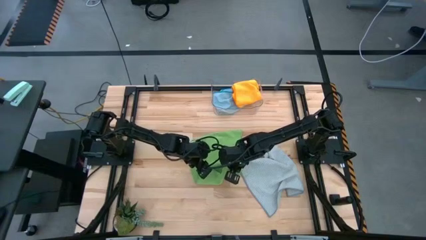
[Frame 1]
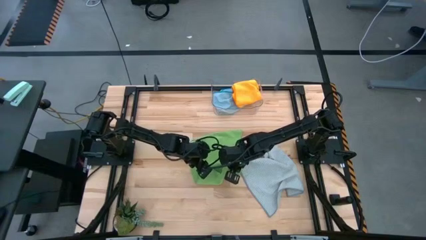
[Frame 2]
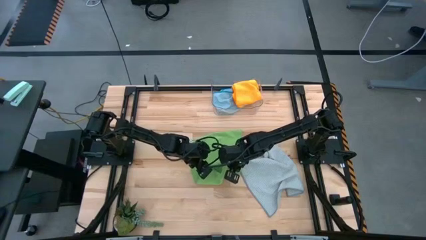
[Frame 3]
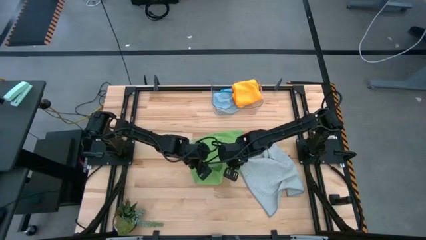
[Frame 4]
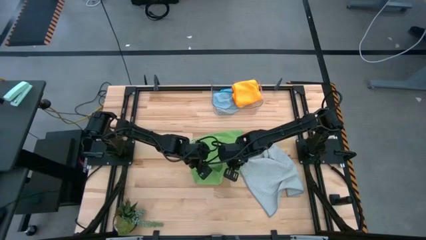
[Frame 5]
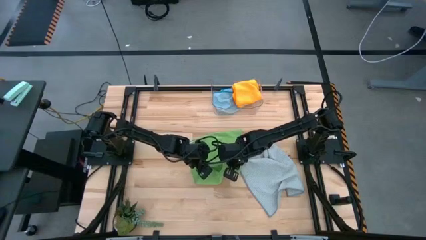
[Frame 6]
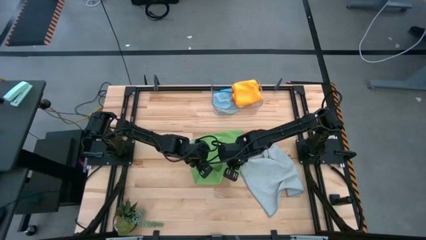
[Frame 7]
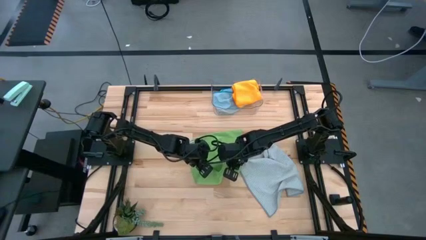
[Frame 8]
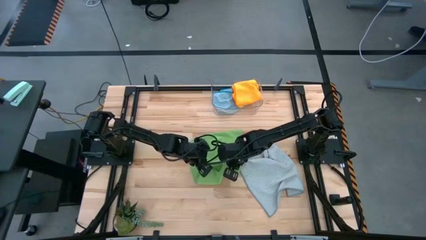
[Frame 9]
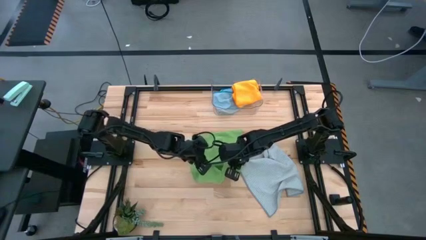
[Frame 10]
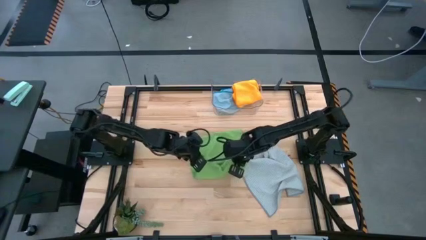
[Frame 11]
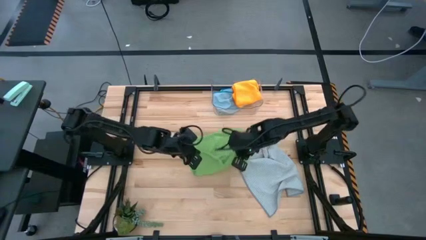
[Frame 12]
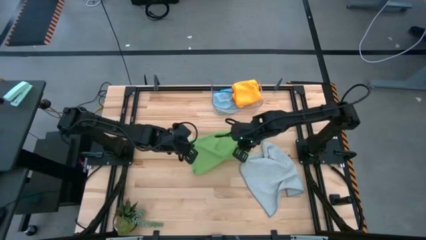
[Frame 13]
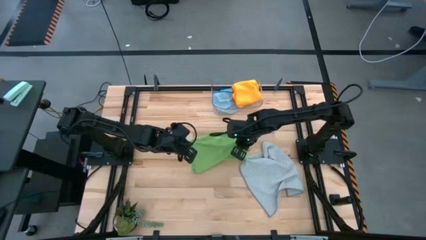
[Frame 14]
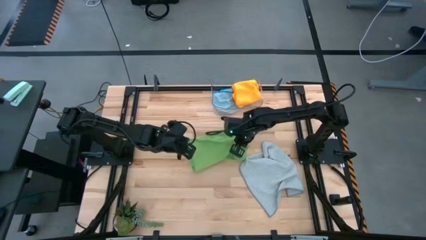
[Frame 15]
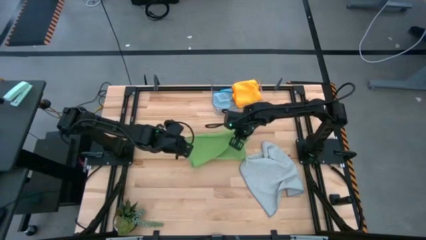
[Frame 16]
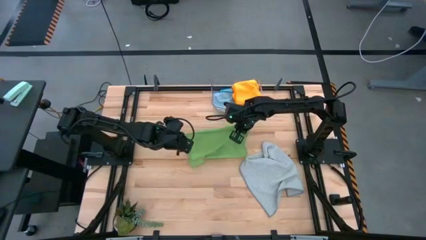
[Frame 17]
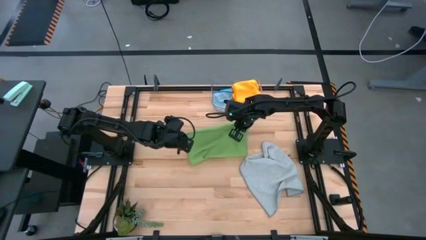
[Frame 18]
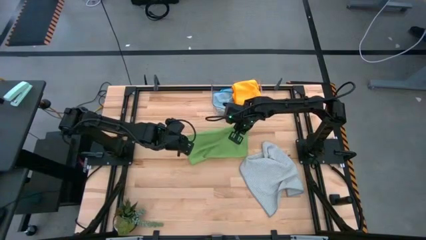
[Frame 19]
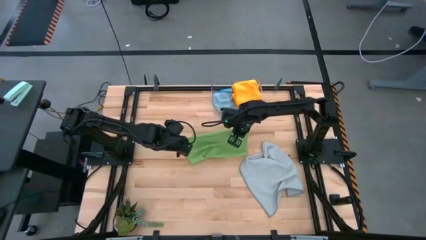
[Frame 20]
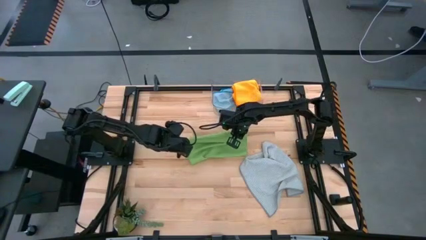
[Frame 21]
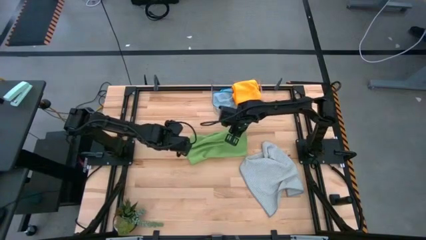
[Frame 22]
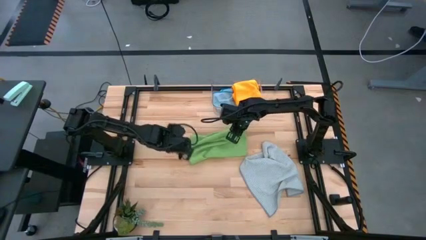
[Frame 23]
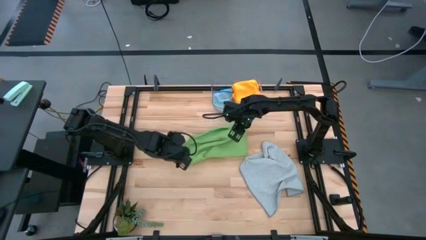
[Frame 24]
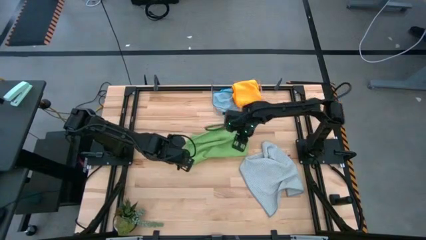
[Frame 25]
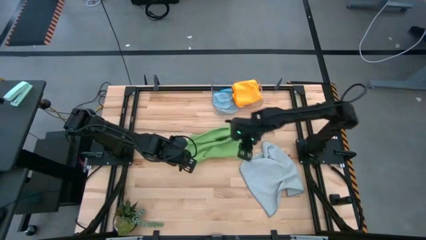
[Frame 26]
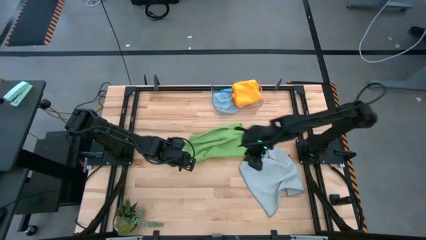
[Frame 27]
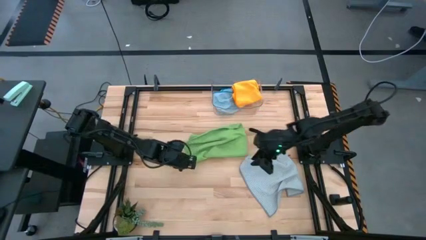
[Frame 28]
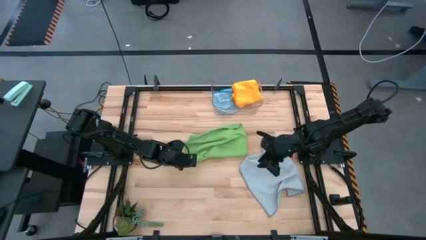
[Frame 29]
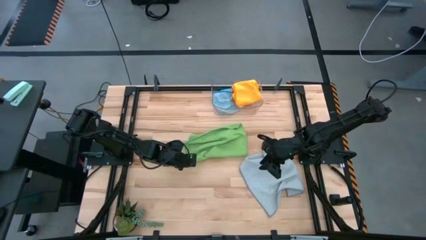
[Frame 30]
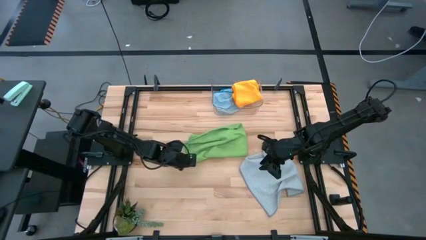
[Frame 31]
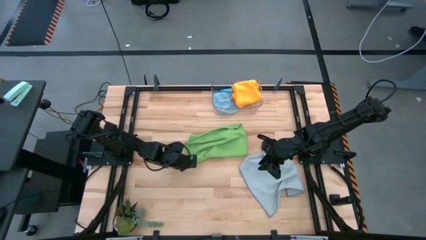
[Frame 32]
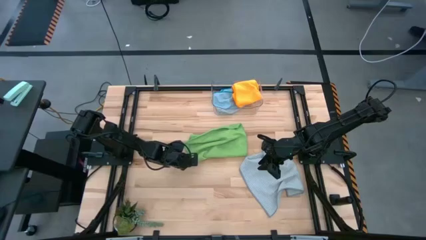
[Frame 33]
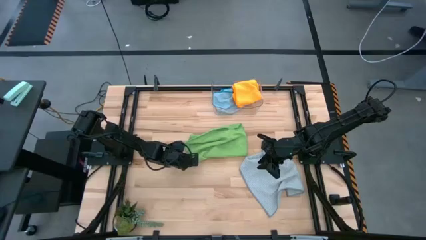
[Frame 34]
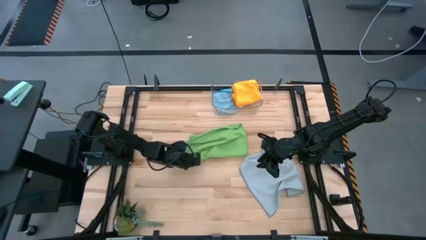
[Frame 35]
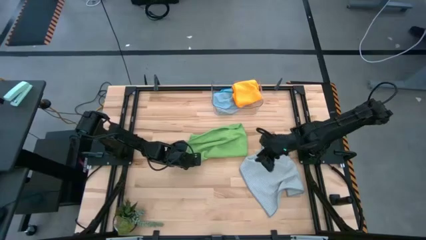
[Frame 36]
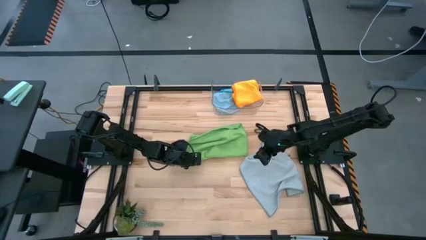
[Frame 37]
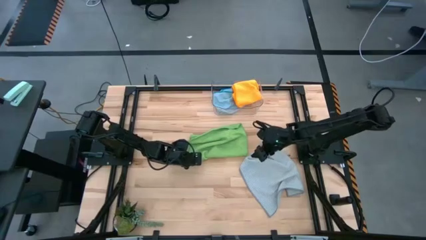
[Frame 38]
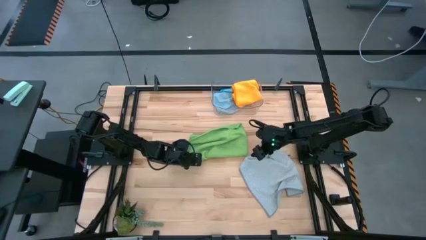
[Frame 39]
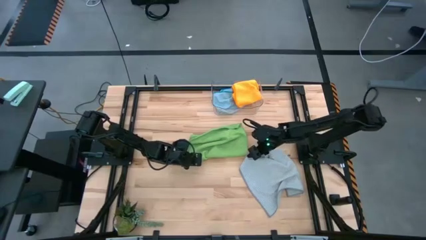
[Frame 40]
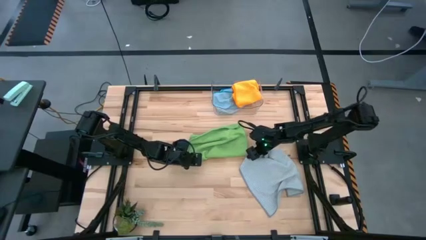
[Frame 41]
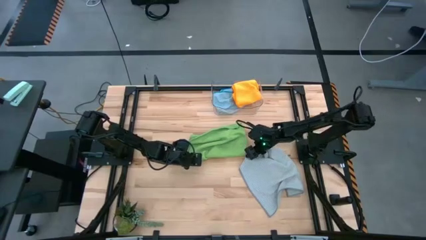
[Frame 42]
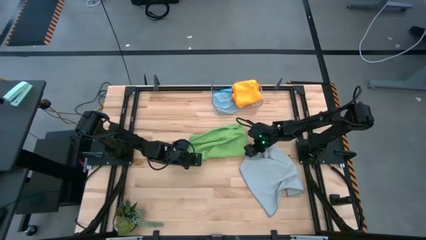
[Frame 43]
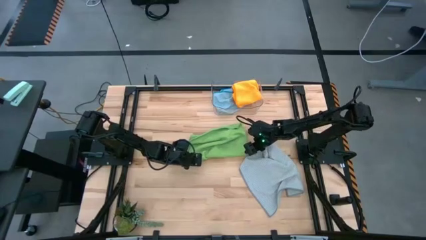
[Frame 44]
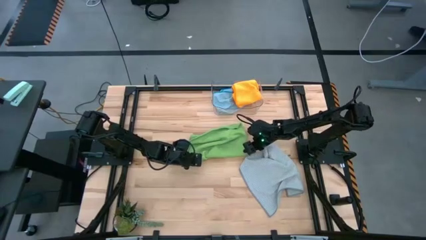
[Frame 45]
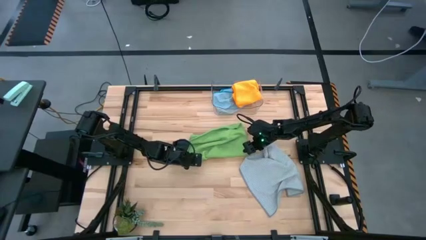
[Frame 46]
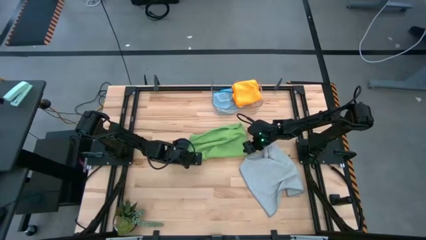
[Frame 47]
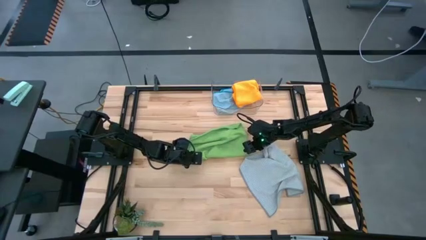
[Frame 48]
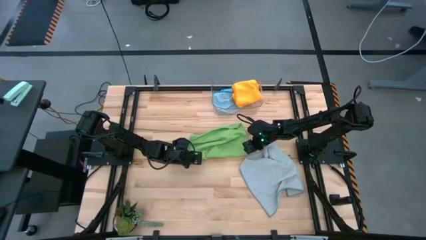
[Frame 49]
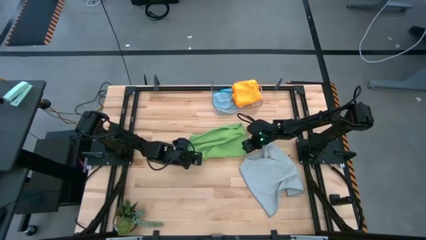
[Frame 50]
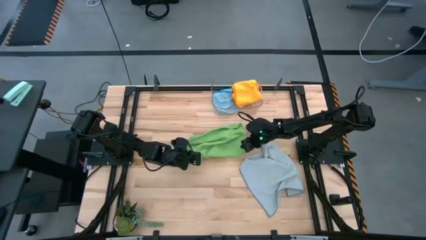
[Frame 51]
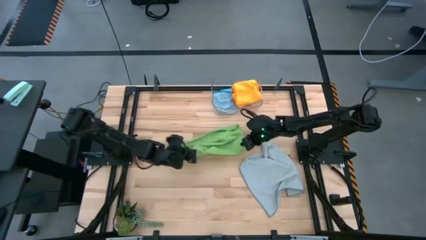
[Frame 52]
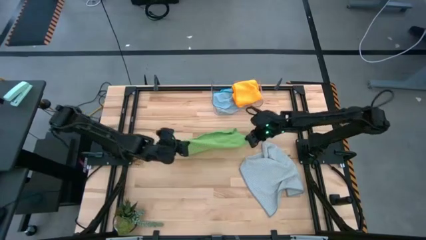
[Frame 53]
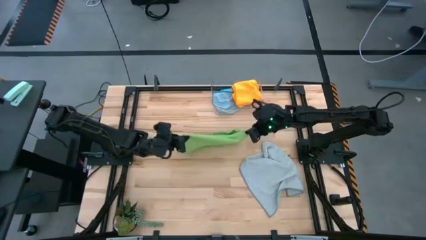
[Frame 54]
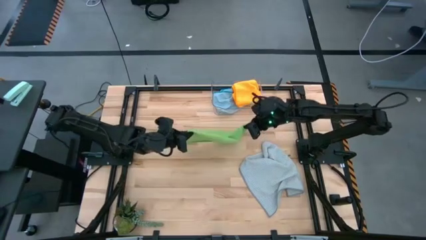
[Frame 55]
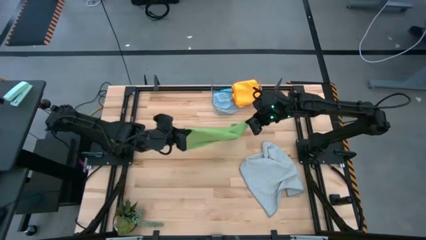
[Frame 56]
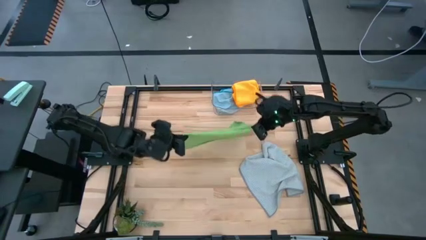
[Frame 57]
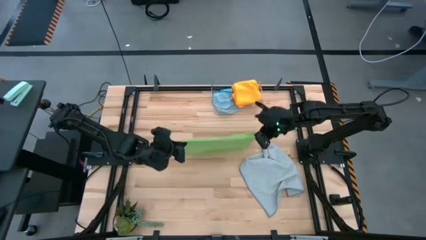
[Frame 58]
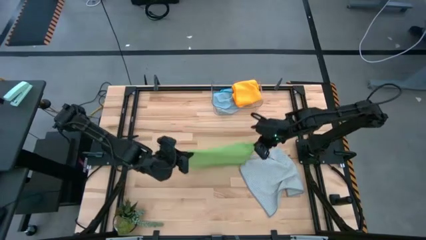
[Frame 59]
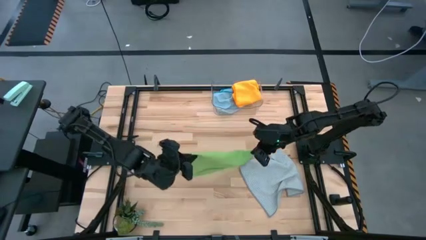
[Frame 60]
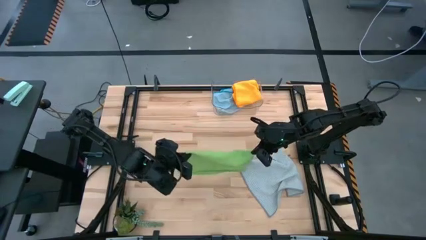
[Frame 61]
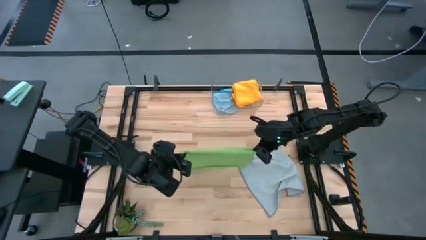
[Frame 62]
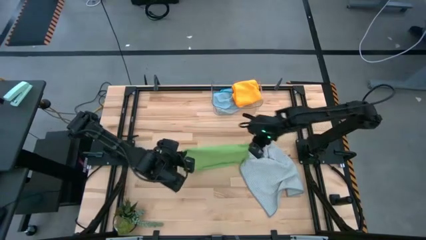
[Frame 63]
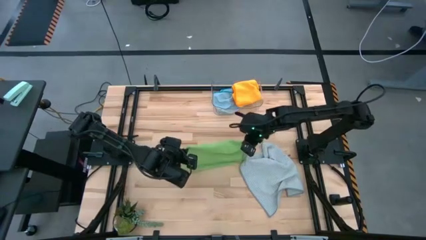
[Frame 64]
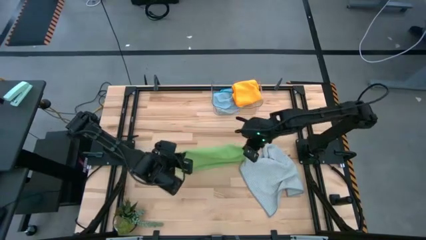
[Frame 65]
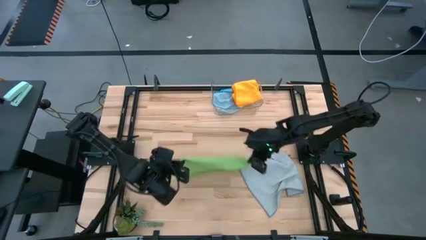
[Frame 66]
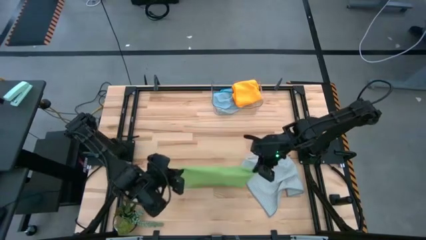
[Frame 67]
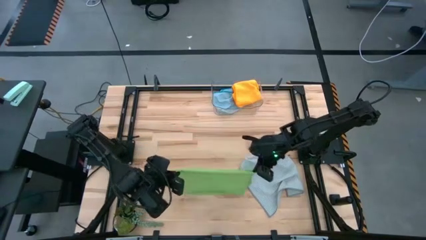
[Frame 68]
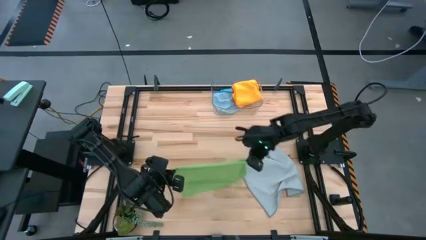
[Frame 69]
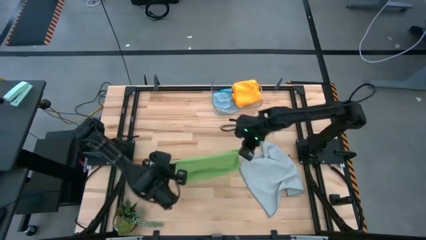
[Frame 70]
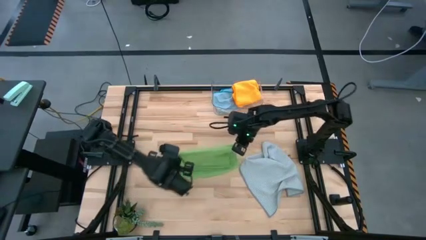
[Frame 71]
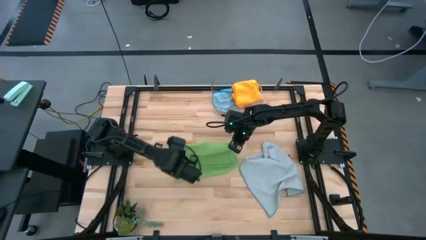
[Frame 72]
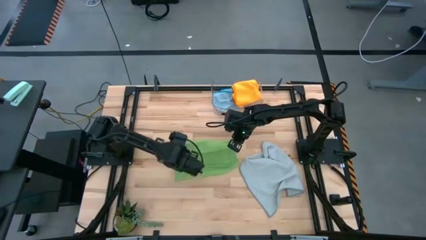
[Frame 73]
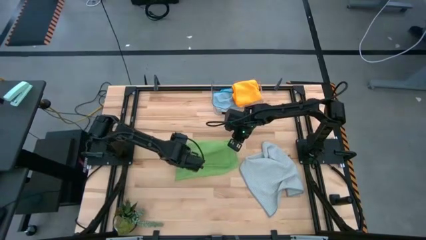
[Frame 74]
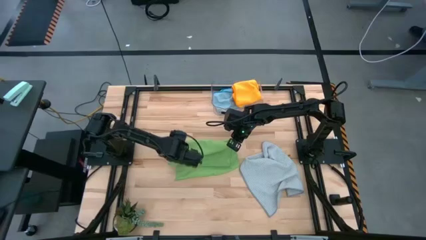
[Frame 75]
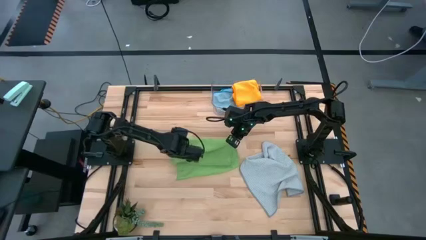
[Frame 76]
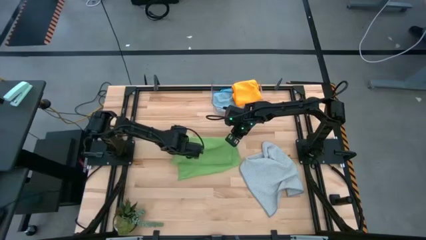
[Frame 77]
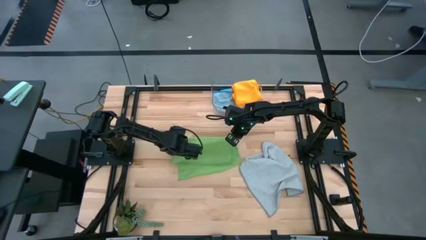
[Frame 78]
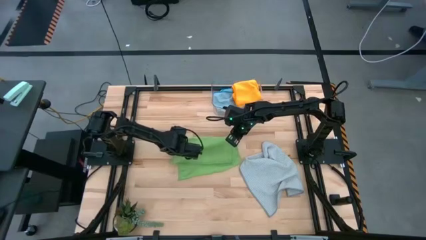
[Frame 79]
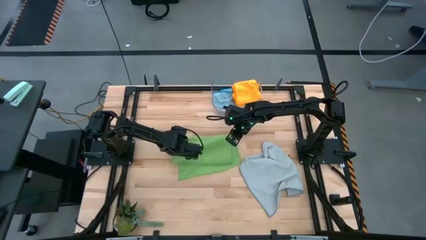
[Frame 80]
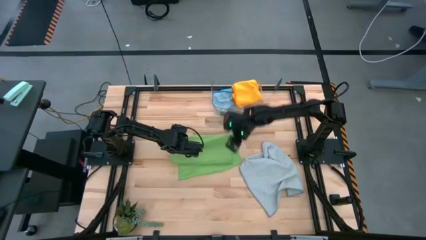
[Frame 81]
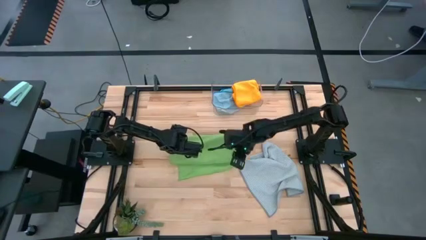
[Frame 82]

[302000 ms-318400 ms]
Task: Fold microfiber towels
Fold the green microfiber cloth
